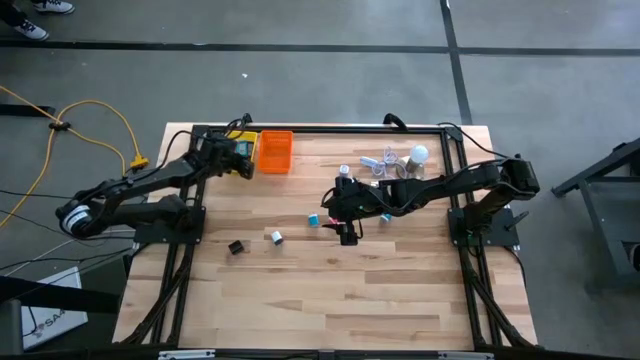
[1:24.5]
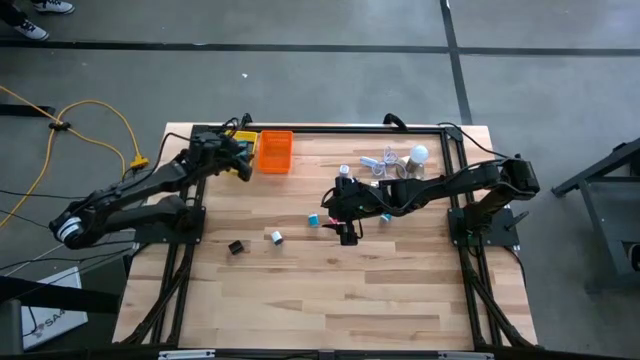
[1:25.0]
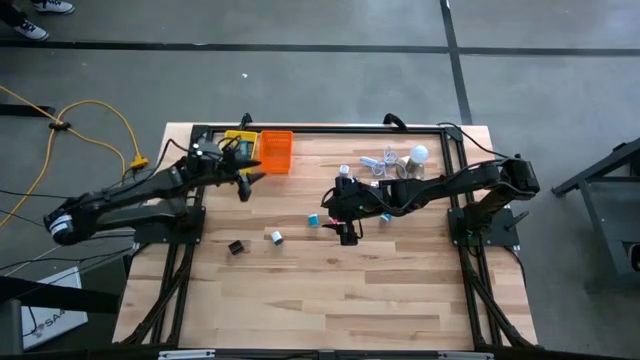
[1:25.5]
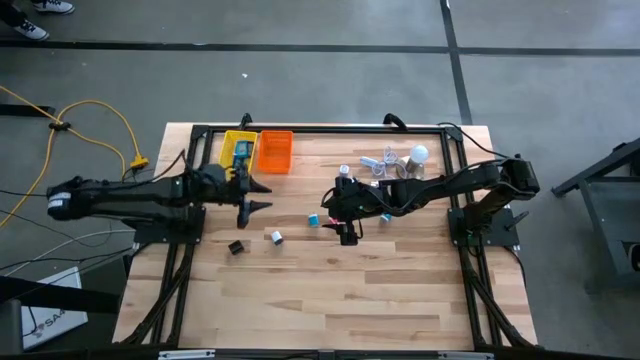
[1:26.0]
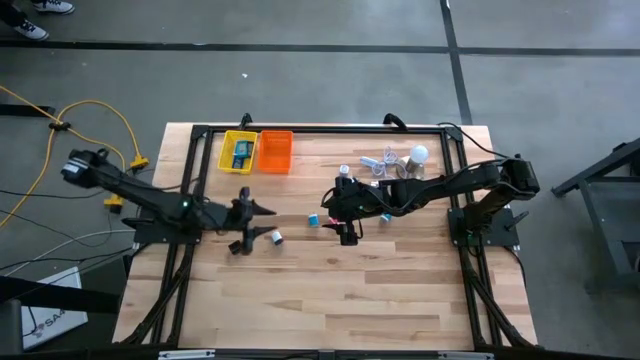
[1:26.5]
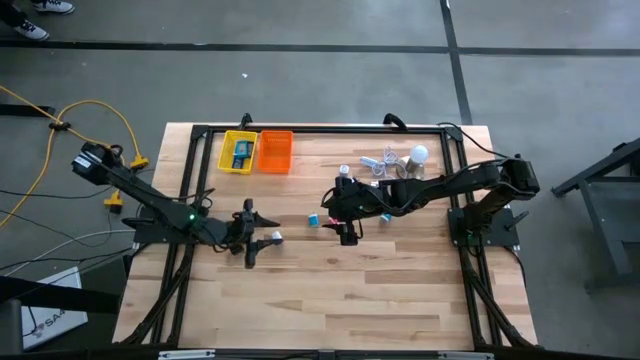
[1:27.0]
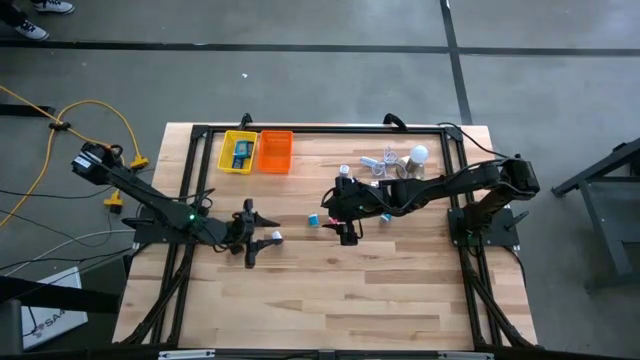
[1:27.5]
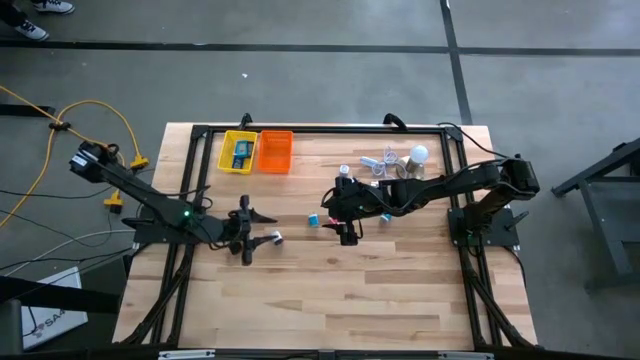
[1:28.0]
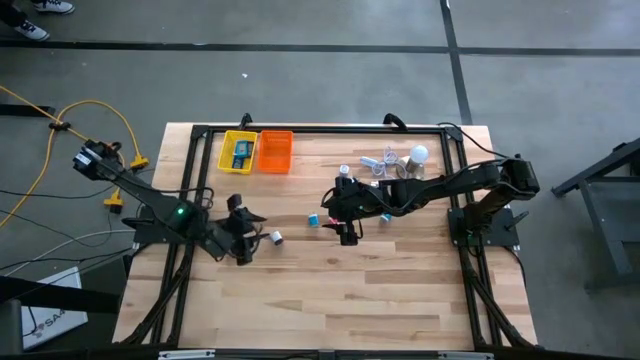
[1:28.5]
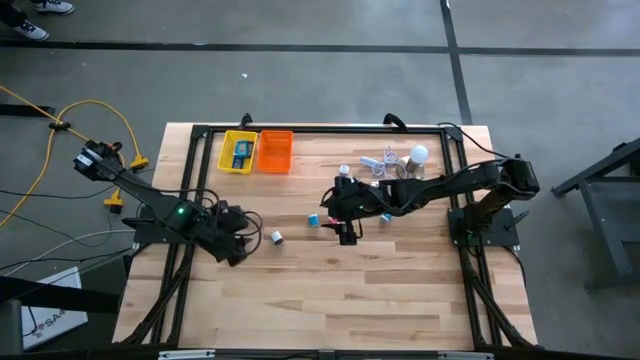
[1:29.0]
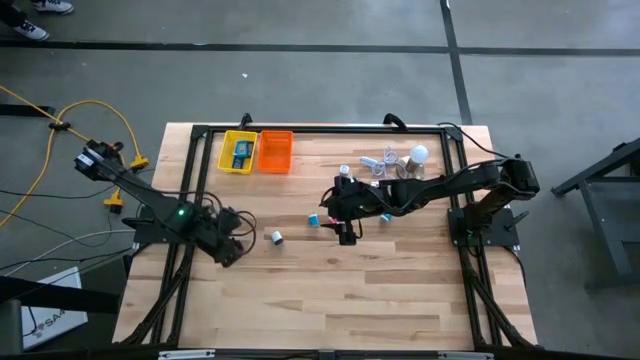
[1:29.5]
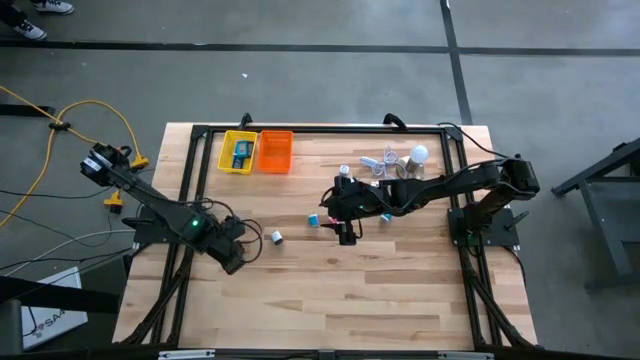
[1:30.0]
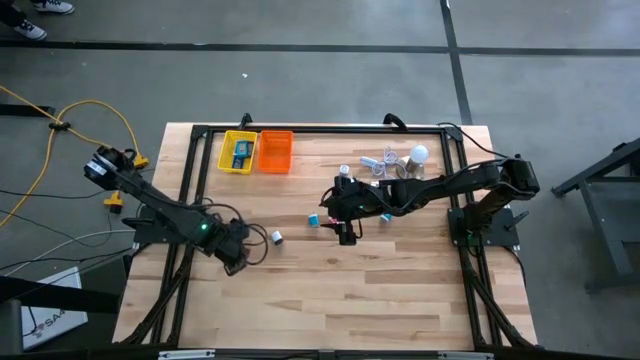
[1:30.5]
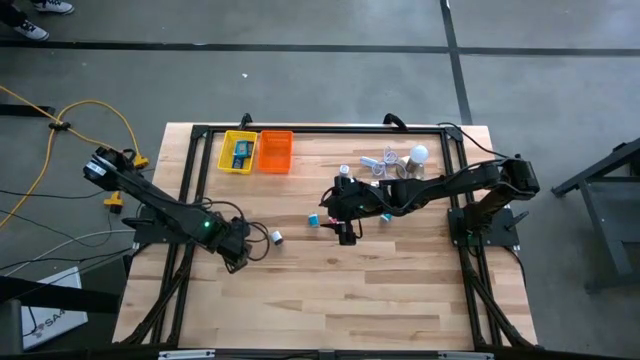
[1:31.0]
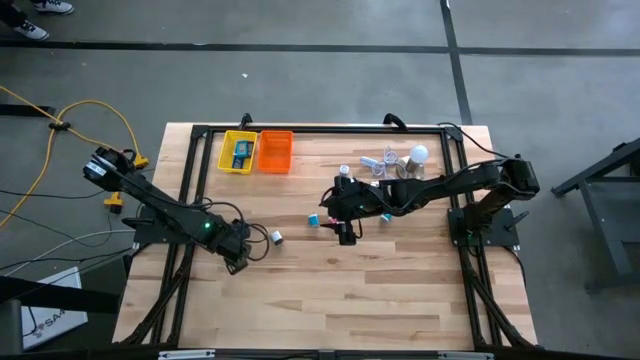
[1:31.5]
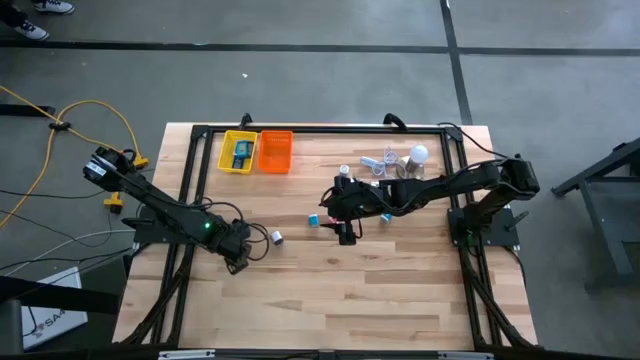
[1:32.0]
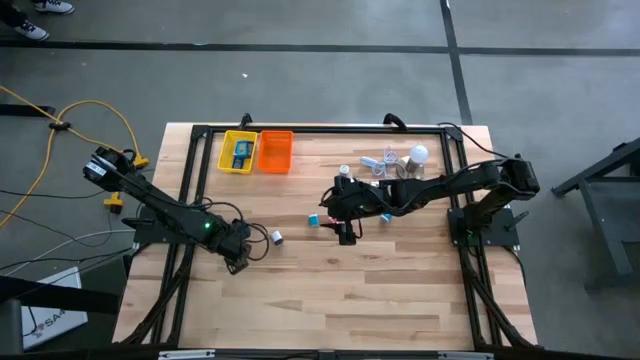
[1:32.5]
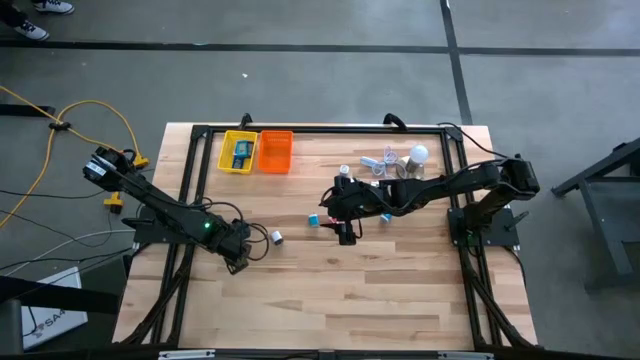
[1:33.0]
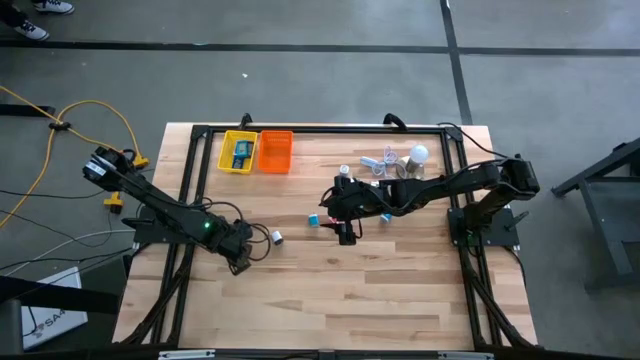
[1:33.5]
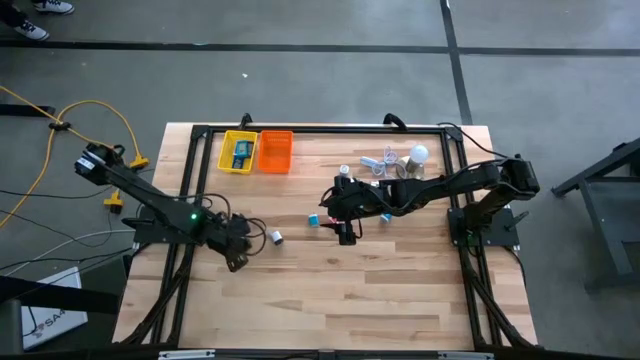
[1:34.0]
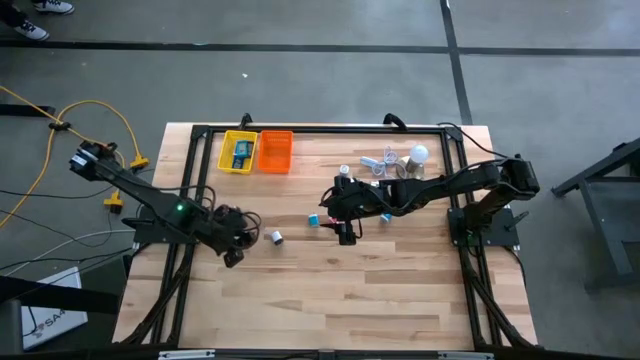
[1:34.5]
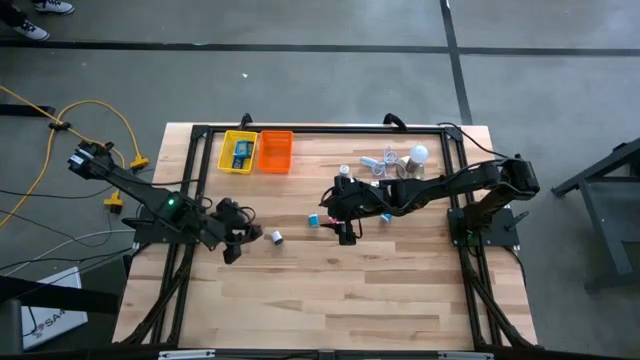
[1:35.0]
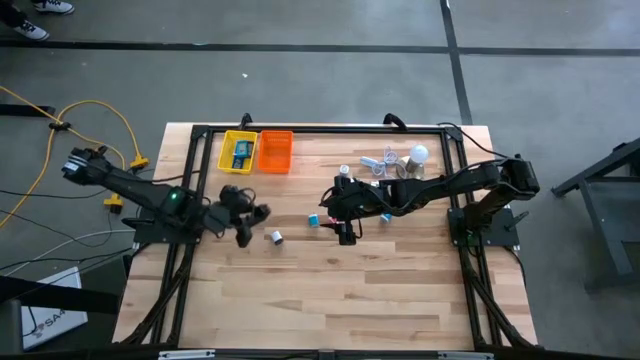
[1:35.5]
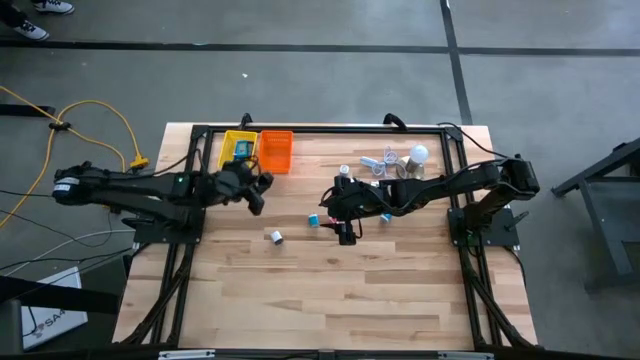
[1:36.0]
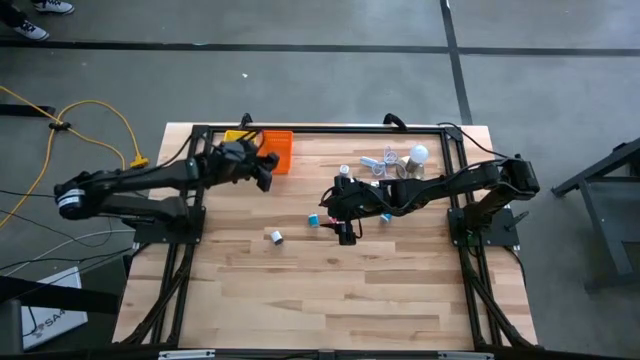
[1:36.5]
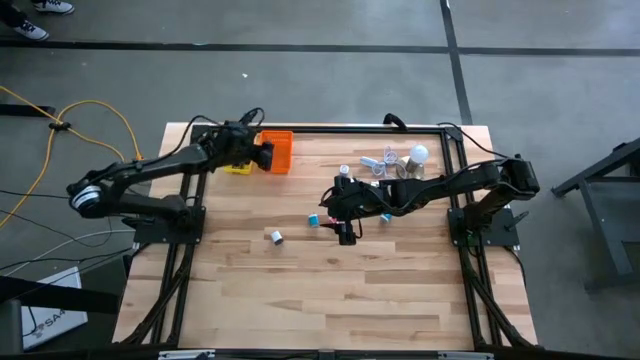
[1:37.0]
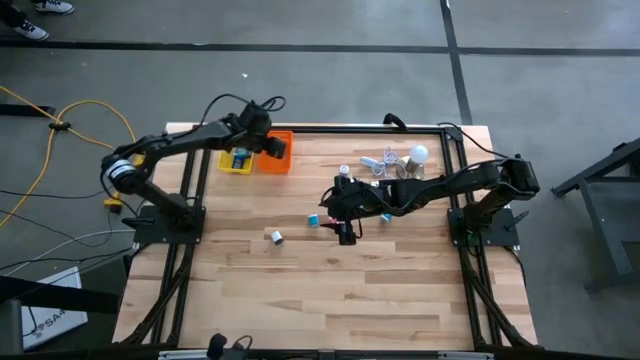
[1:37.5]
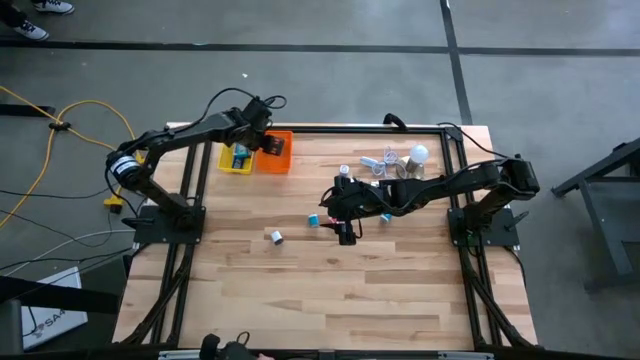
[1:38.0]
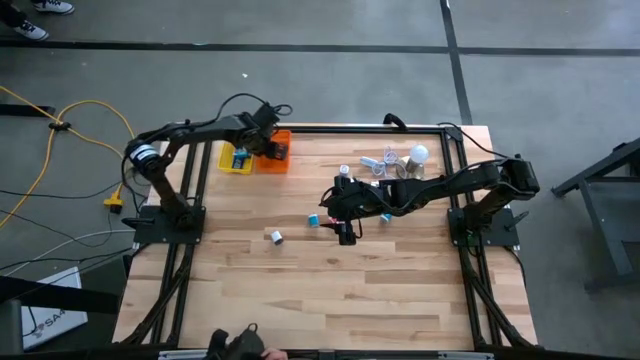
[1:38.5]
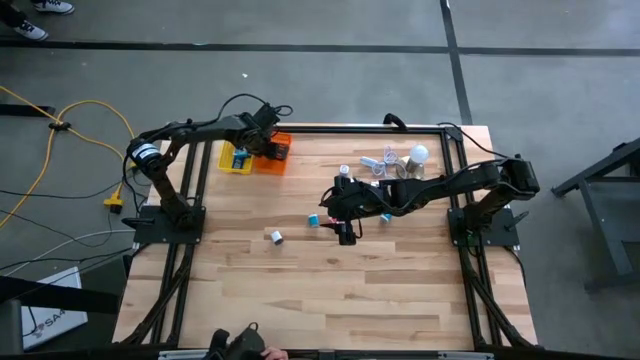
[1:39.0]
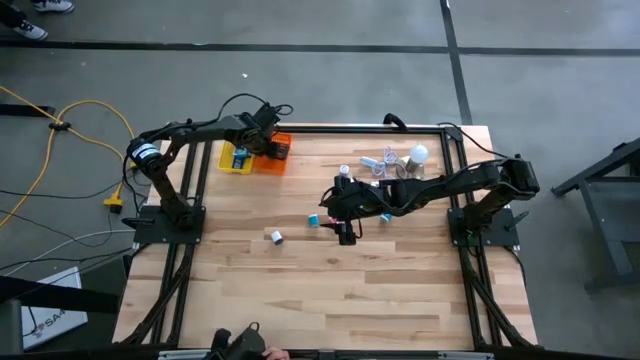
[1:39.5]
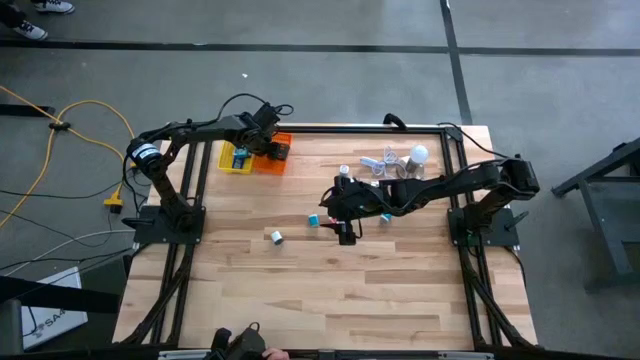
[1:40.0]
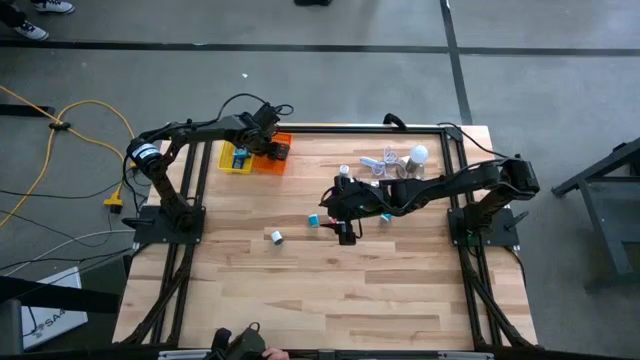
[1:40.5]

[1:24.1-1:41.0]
Task: Pick & Place Office items
Put the left black adapter into the orange basket

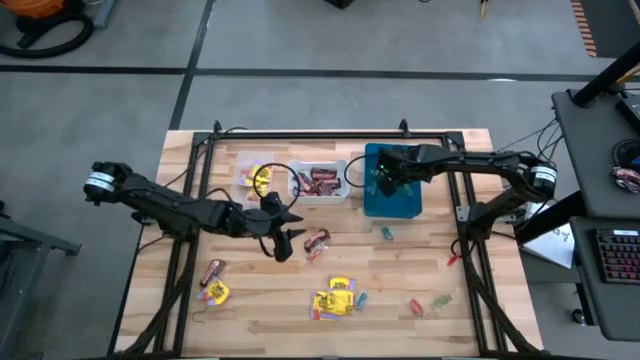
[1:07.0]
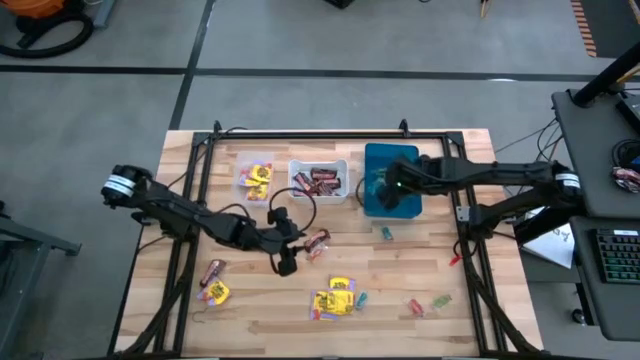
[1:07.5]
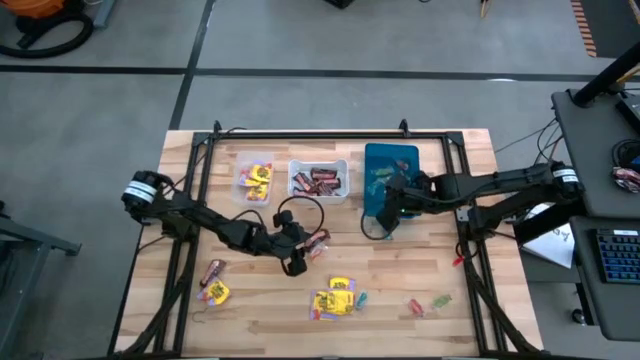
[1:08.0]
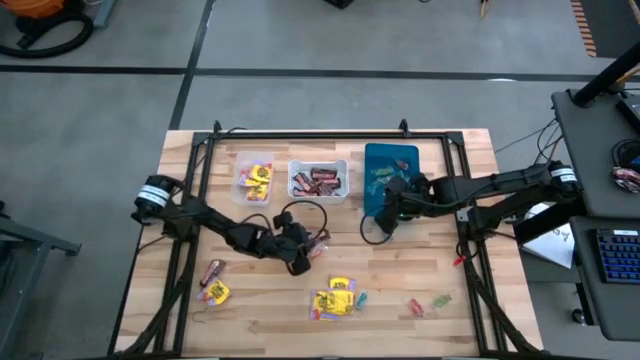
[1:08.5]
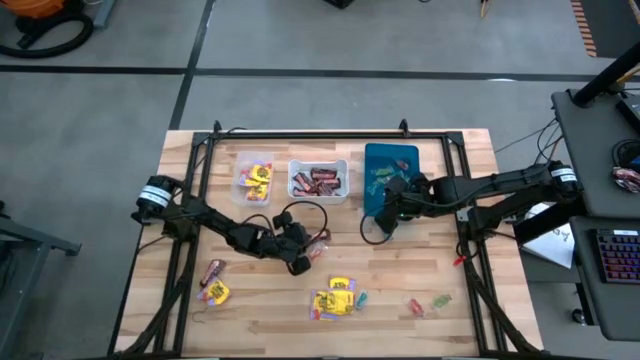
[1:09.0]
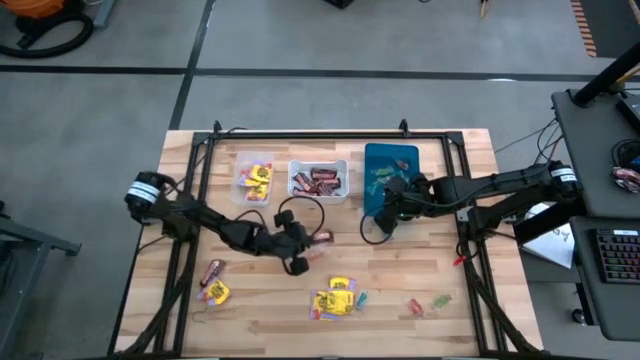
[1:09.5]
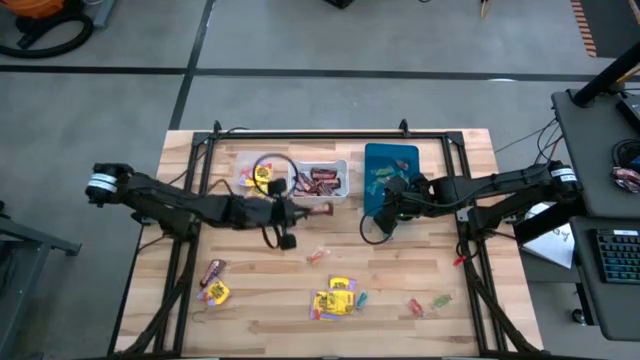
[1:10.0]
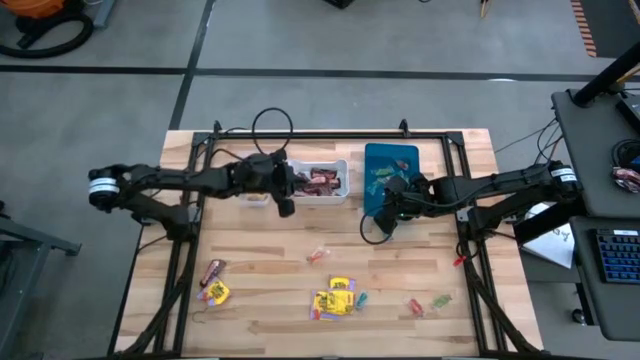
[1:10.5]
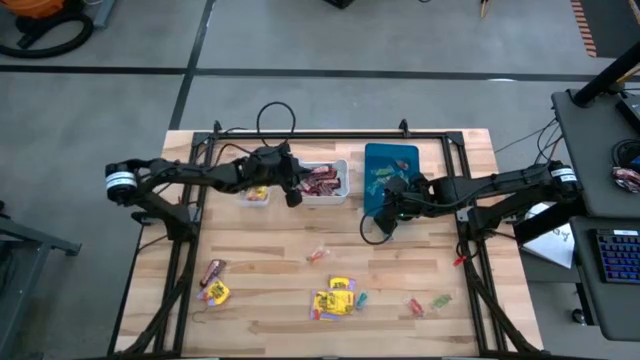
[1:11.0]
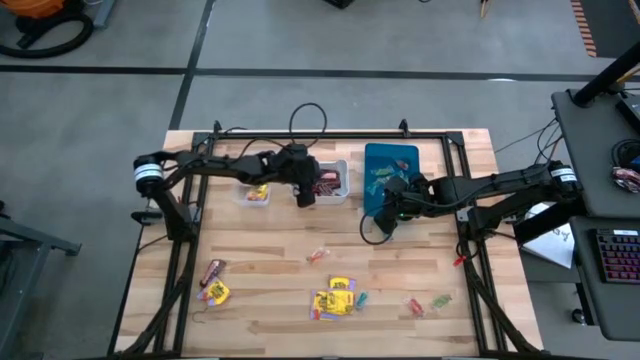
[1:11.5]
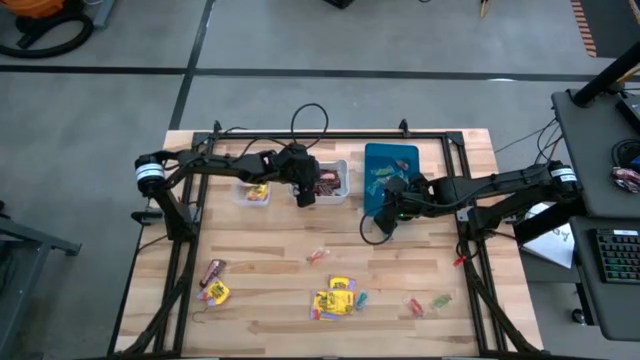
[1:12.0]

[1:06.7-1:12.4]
Task: Sort candy
Put the brown chocolate into the white bin
